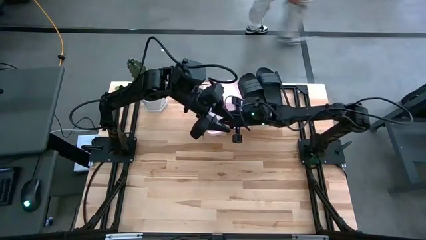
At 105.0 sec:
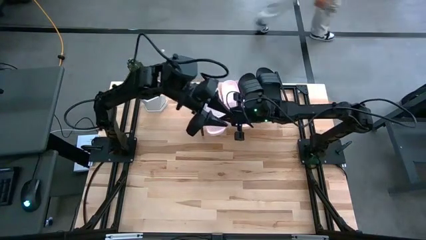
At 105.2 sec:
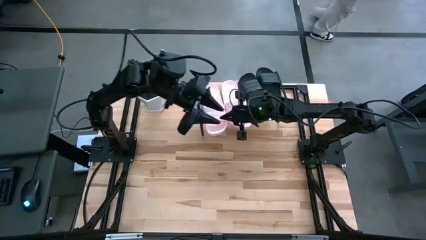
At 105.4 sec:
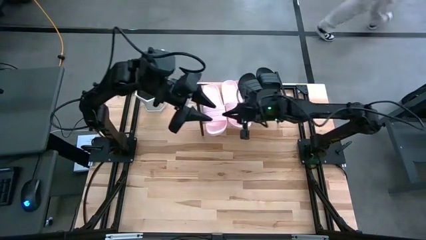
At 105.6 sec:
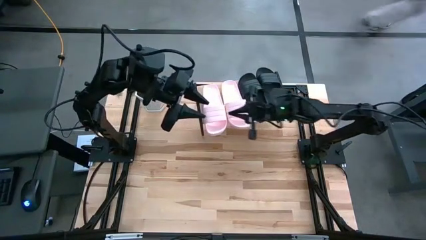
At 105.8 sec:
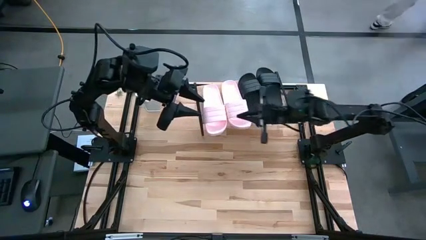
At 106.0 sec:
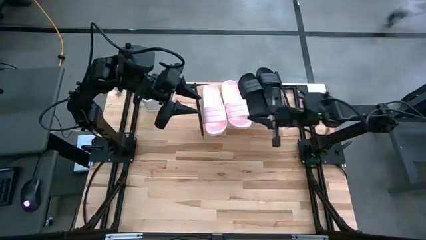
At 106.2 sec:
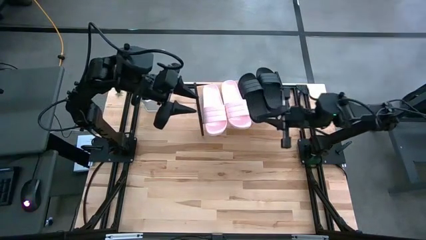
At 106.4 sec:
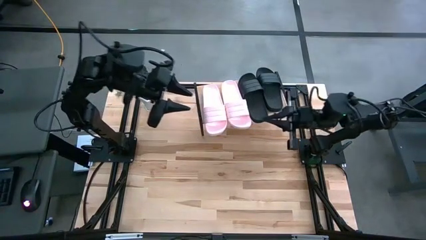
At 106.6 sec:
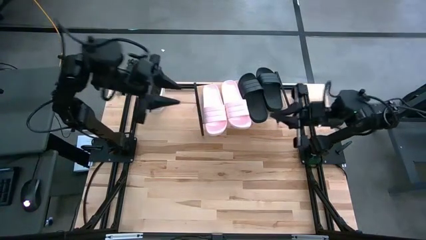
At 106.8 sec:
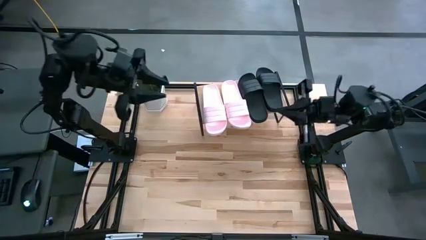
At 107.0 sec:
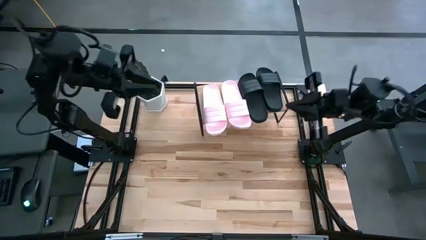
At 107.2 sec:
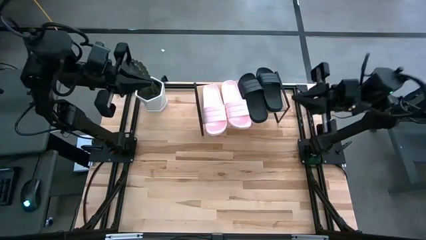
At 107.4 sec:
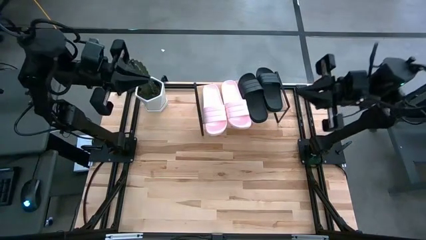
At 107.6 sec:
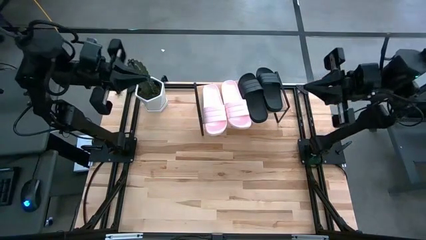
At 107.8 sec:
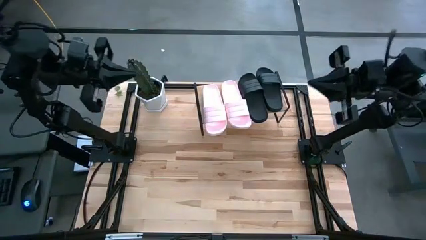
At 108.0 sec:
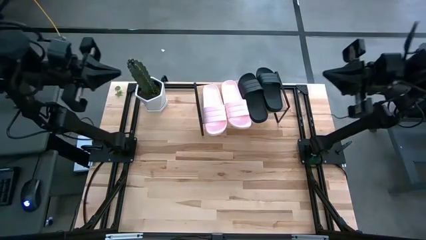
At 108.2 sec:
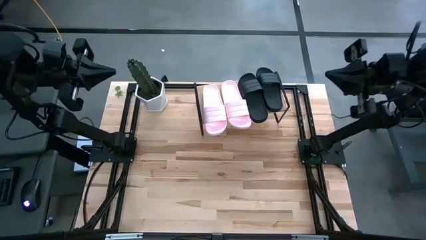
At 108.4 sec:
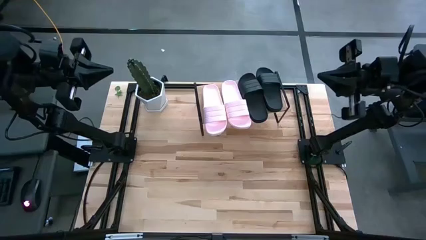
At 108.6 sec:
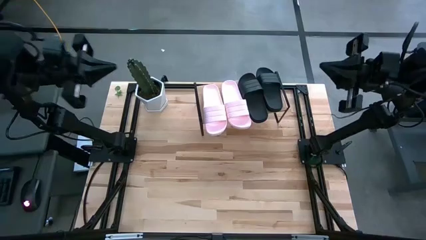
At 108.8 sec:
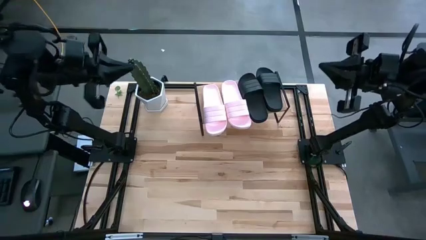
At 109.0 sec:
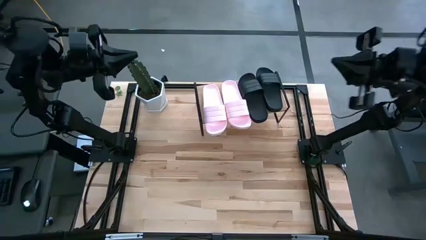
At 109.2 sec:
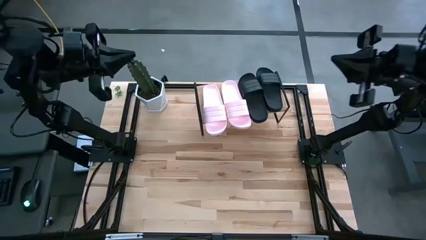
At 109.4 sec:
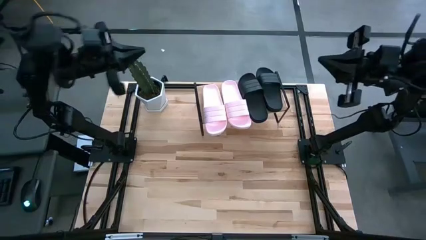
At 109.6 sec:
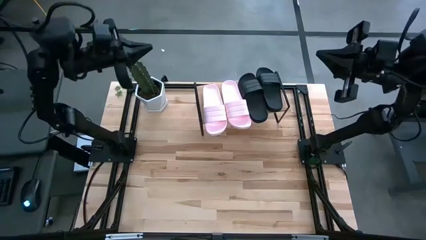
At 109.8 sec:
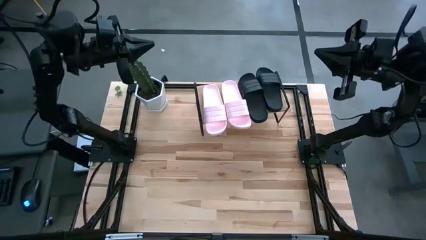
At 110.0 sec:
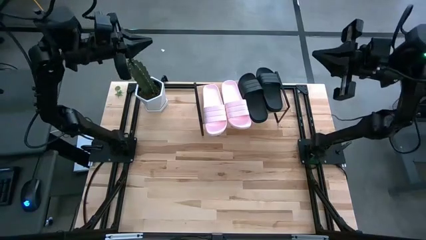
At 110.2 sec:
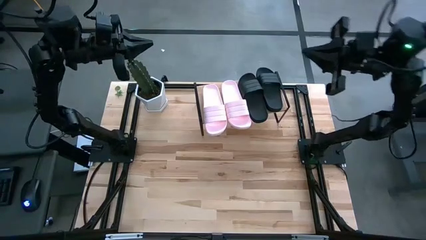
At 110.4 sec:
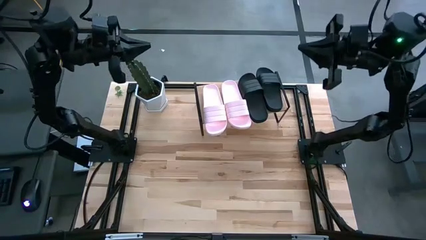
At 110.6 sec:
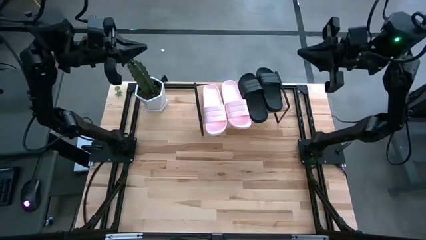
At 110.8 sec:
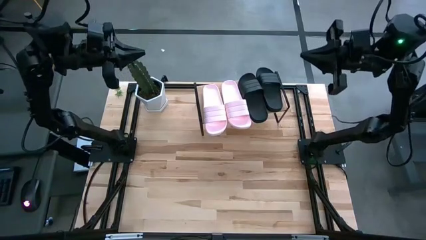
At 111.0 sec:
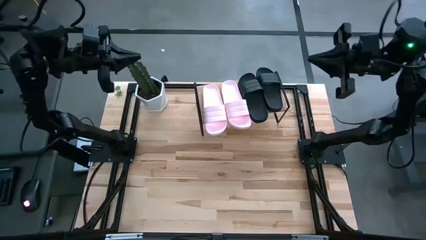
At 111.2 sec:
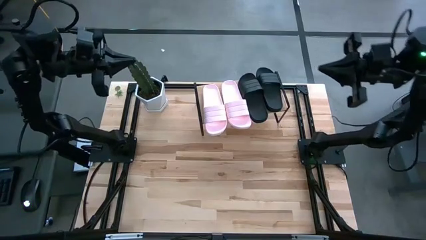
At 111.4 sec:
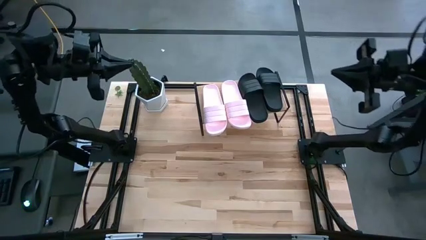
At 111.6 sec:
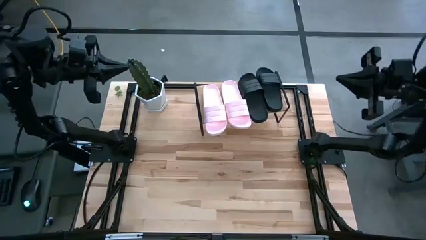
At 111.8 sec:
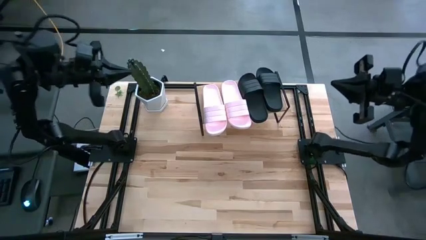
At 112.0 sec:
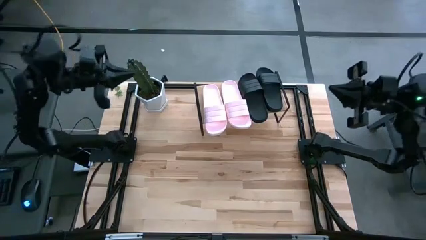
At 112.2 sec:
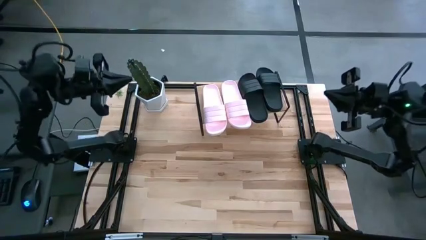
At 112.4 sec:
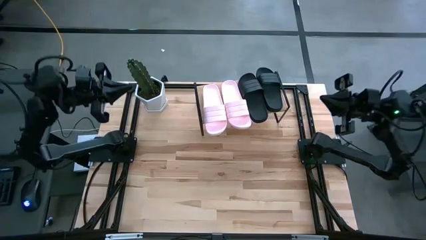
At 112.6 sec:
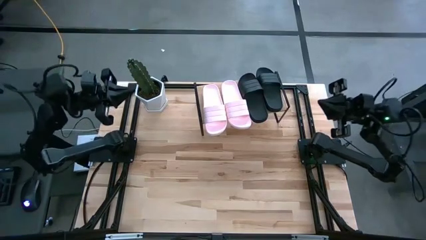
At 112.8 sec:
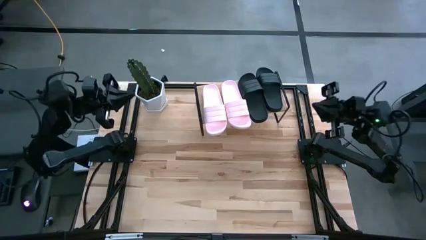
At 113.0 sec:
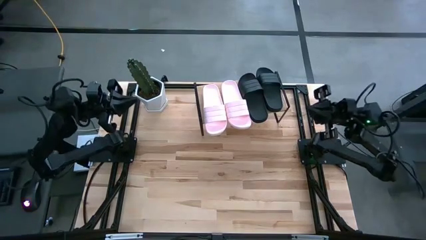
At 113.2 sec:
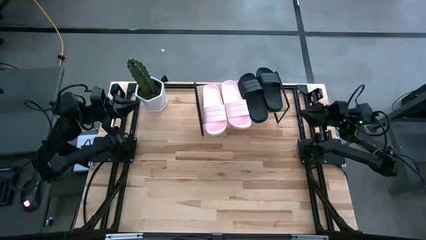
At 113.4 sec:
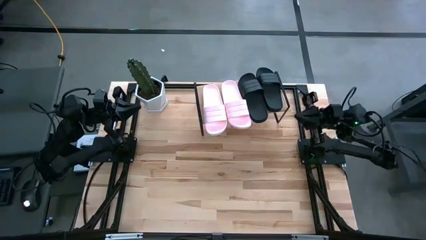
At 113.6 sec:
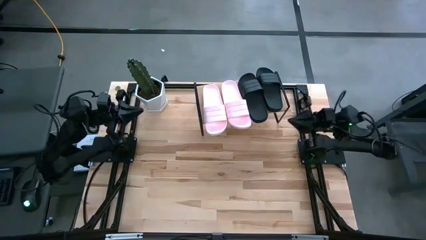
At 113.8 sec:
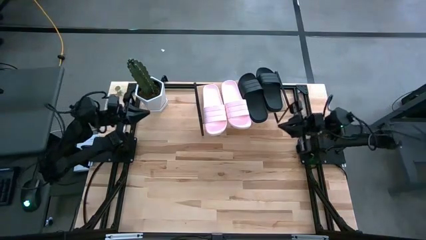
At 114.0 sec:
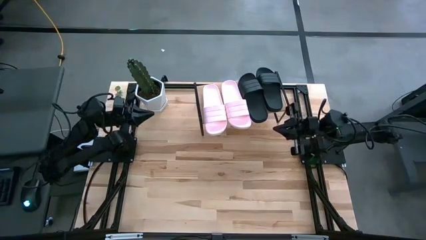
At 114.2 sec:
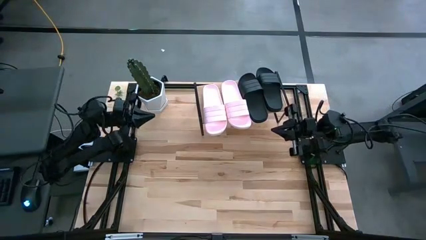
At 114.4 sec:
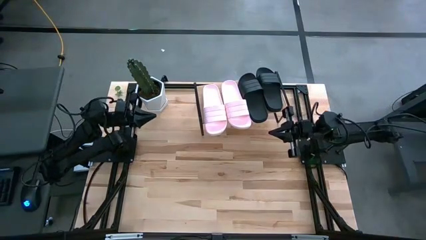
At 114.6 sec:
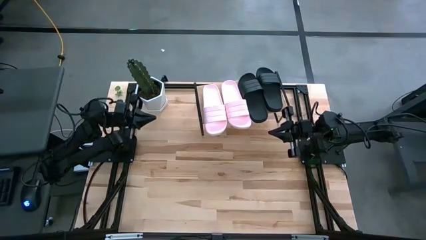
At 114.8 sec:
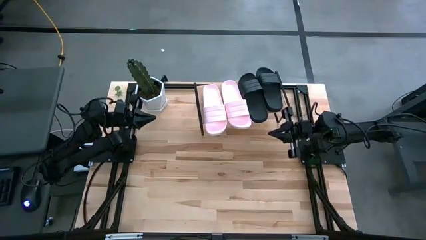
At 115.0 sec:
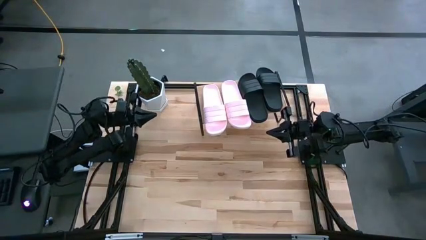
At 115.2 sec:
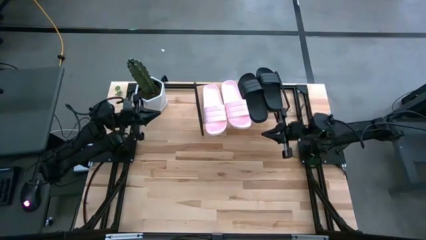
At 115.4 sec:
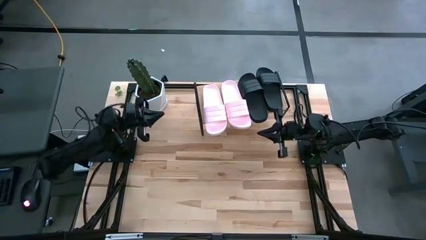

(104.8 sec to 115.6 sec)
Task: Pick and place slides into the shelf
Return to Home Position
